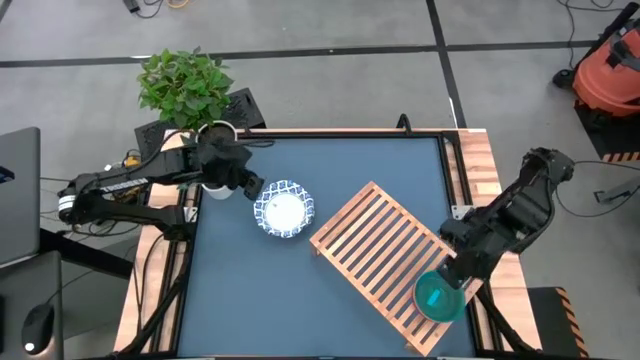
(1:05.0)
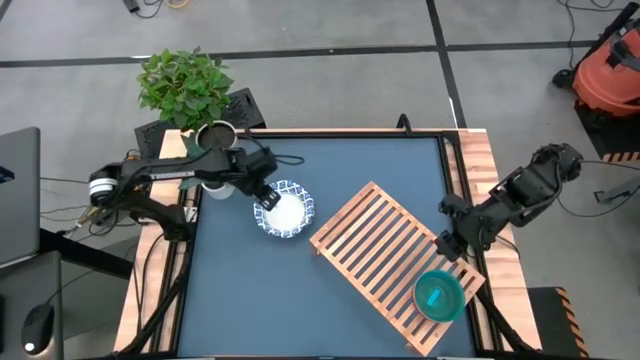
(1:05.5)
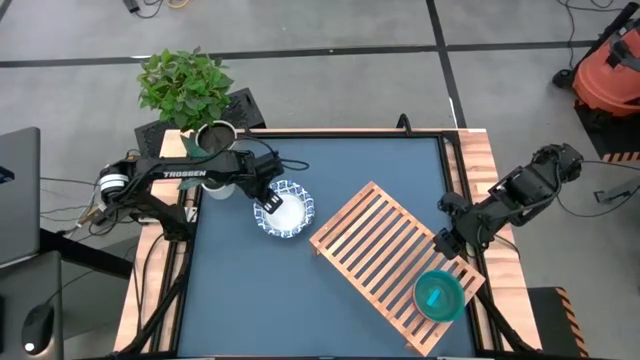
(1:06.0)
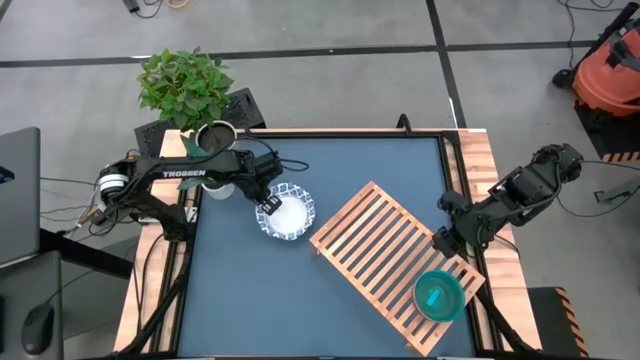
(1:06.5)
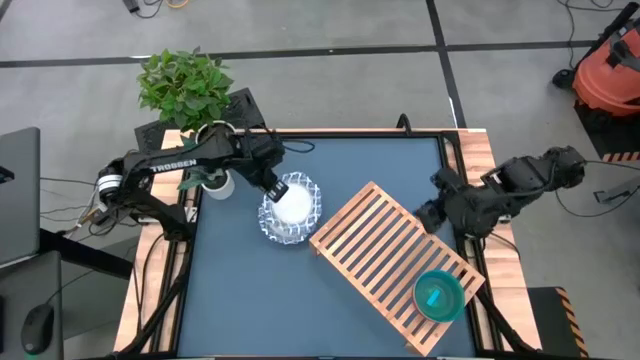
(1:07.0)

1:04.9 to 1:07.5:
Task: Place and stack bowls onto a shelf
Put the white bowl on the shelf

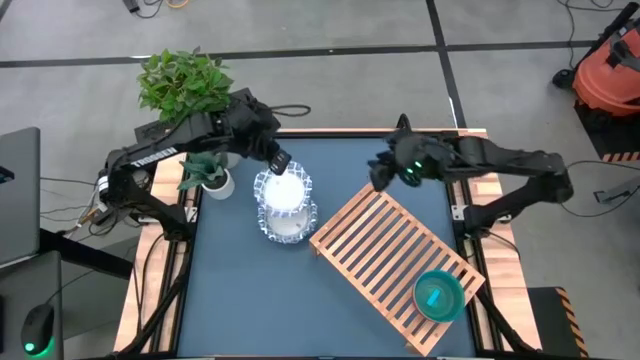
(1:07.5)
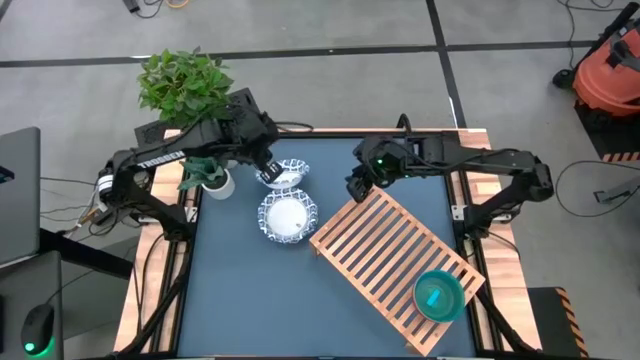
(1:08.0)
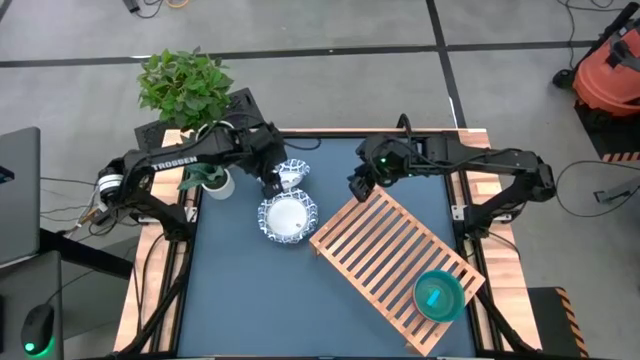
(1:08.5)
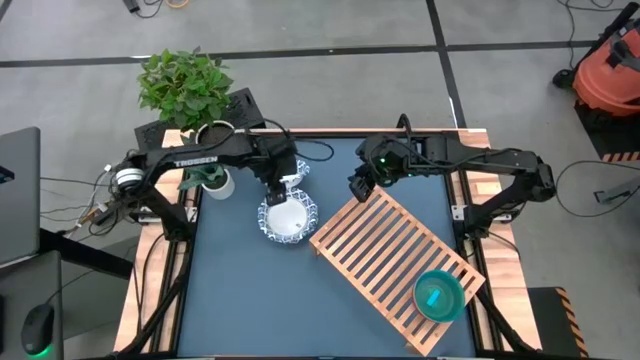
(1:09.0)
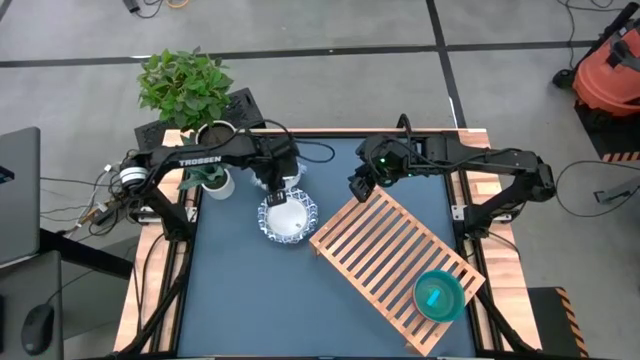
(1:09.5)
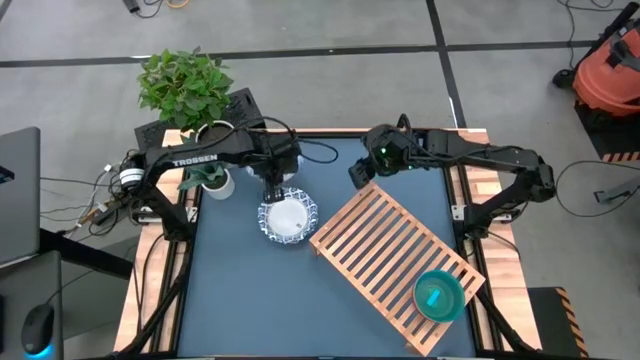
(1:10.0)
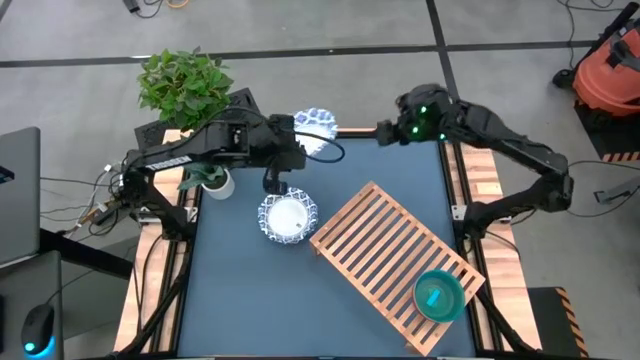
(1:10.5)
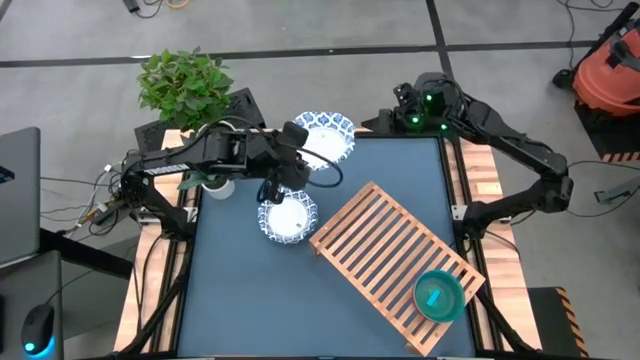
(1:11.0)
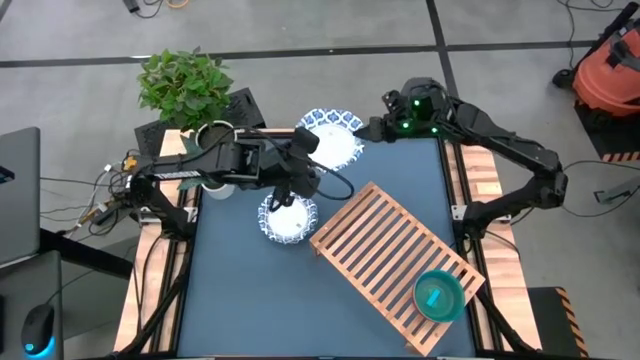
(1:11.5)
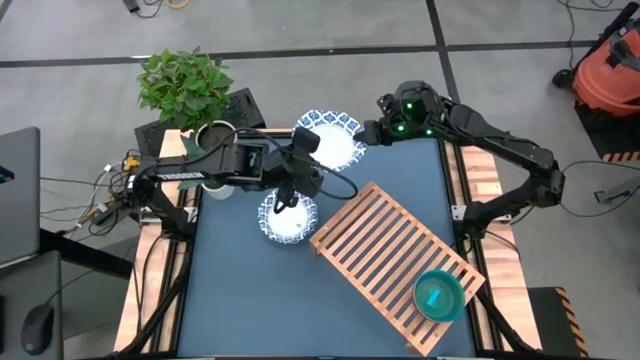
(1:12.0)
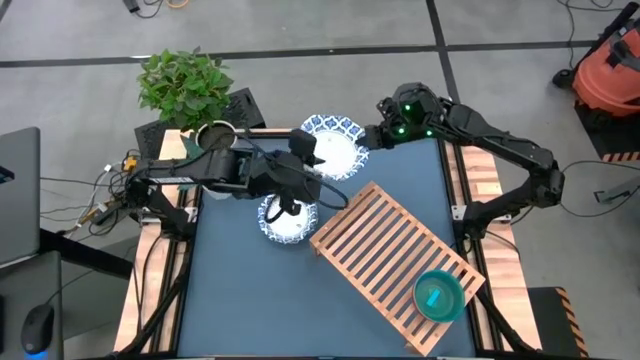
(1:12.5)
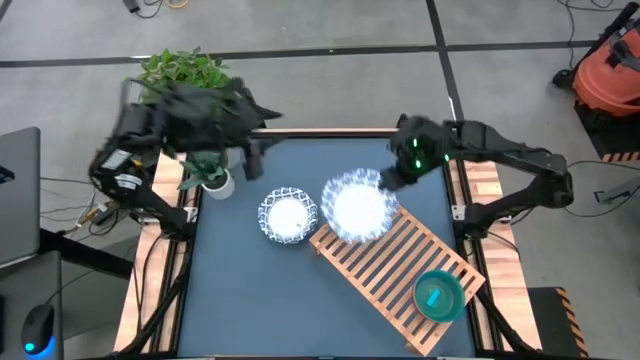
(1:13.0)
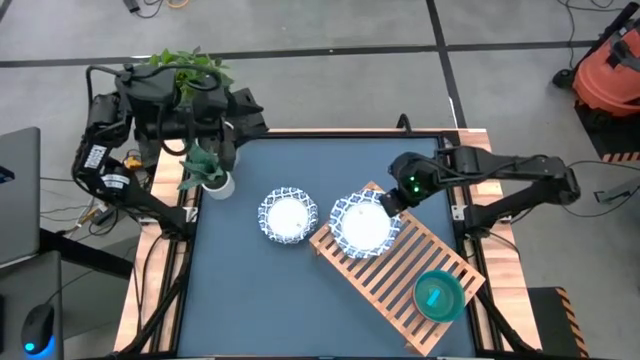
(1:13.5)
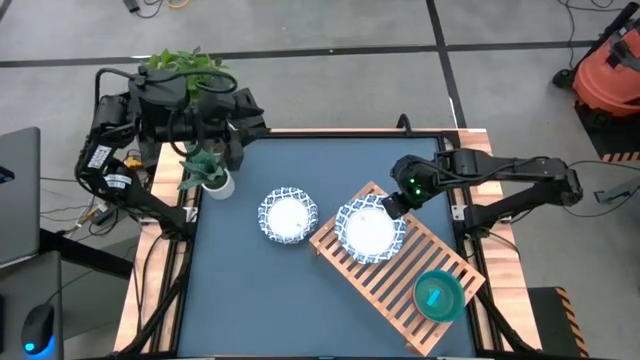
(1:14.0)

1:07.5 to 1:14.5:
Put the white bowl on the shelf

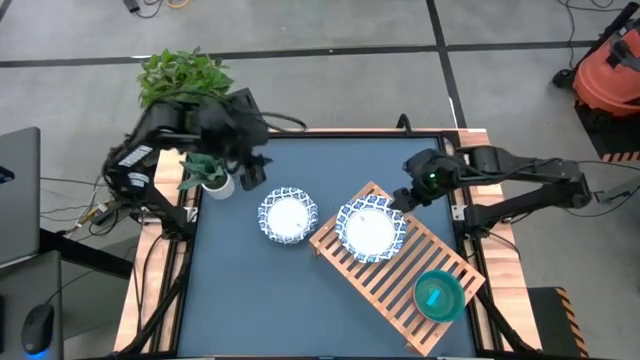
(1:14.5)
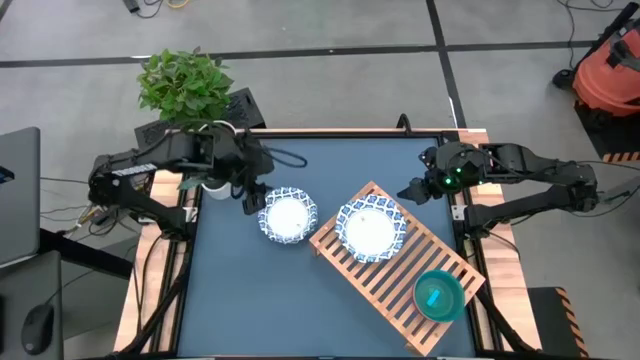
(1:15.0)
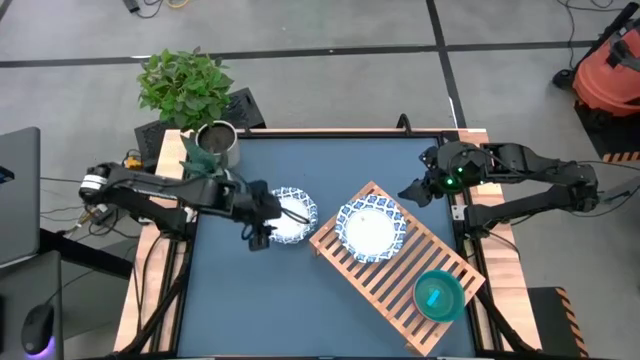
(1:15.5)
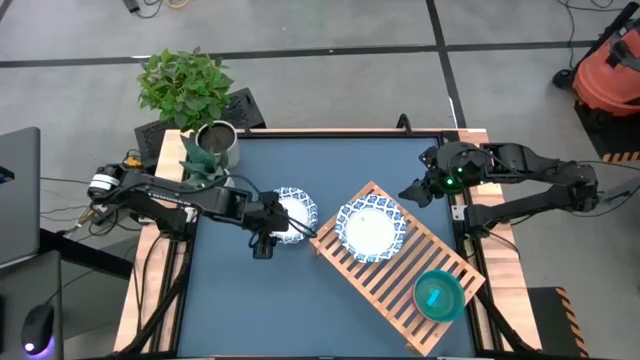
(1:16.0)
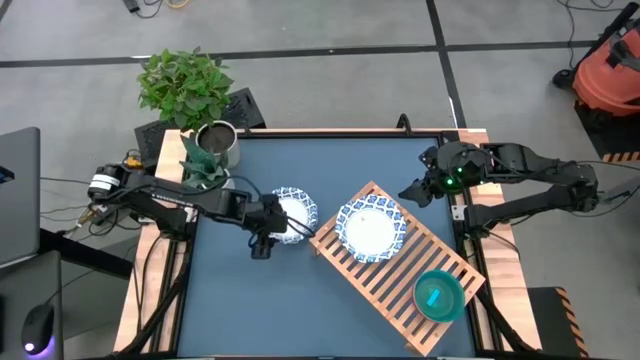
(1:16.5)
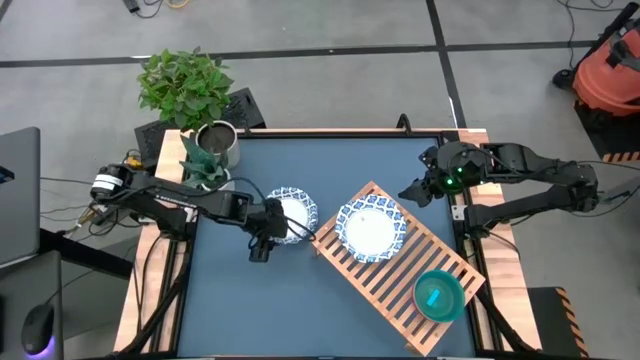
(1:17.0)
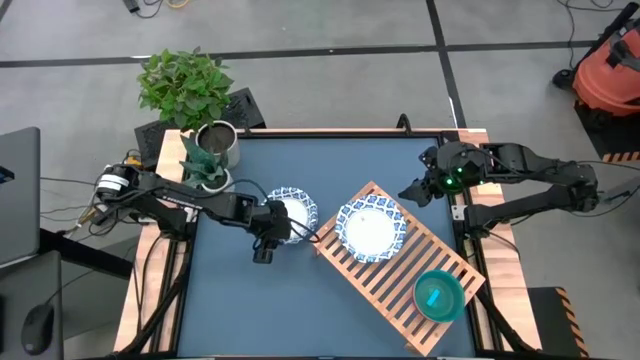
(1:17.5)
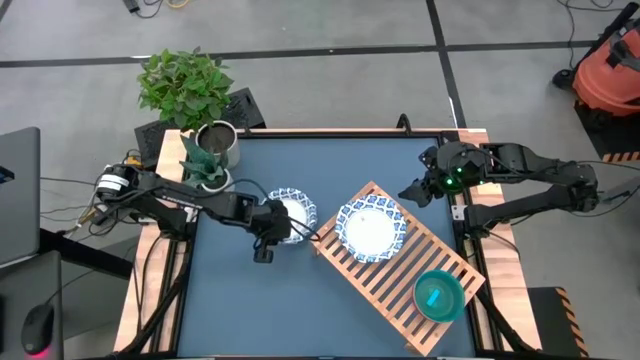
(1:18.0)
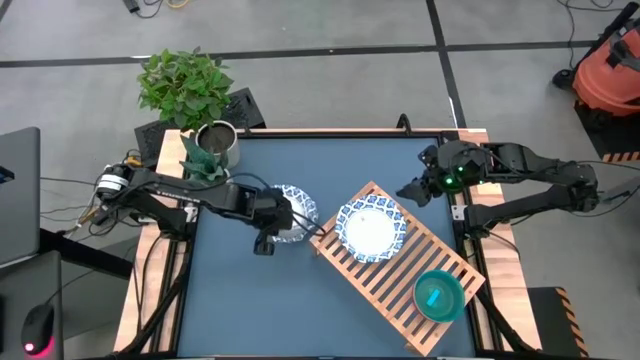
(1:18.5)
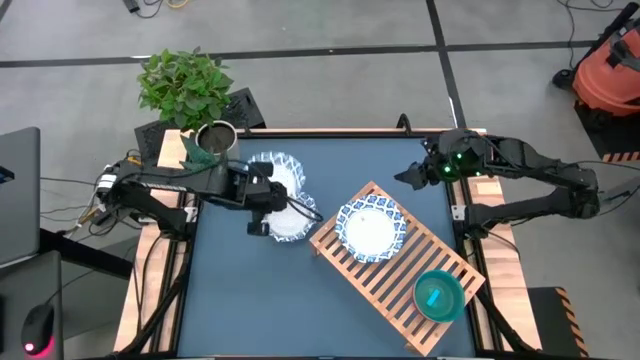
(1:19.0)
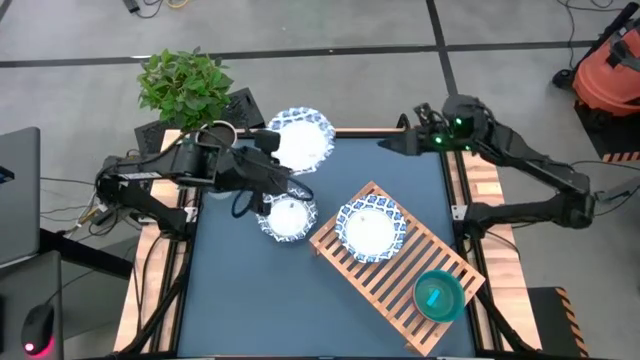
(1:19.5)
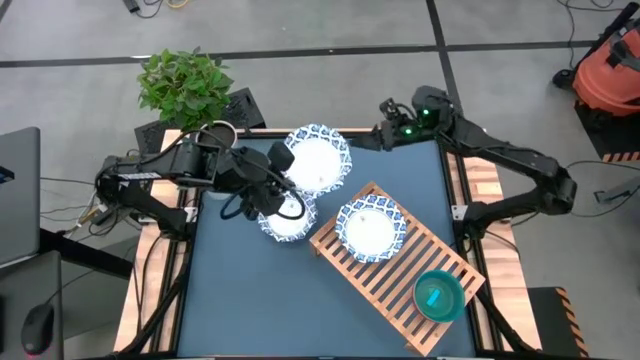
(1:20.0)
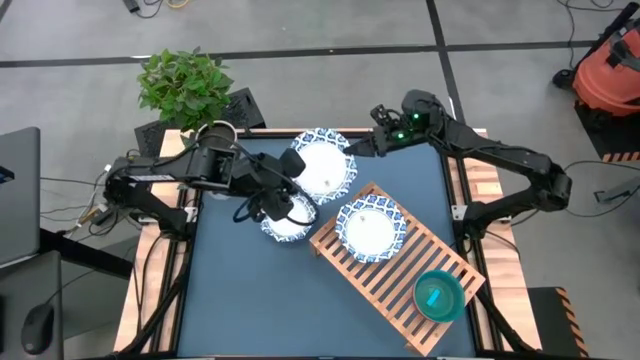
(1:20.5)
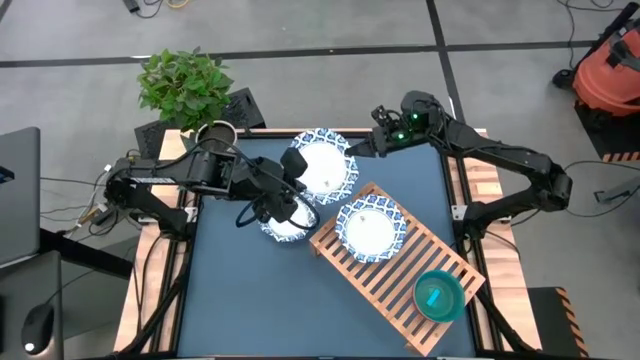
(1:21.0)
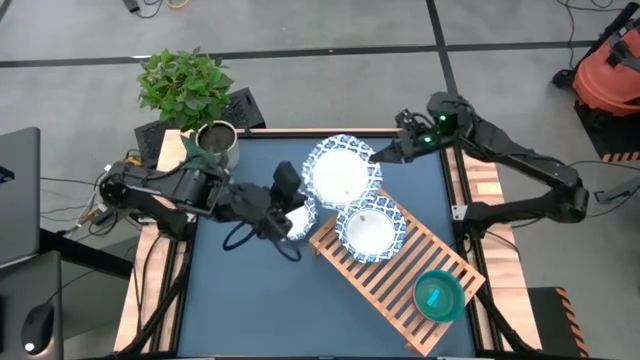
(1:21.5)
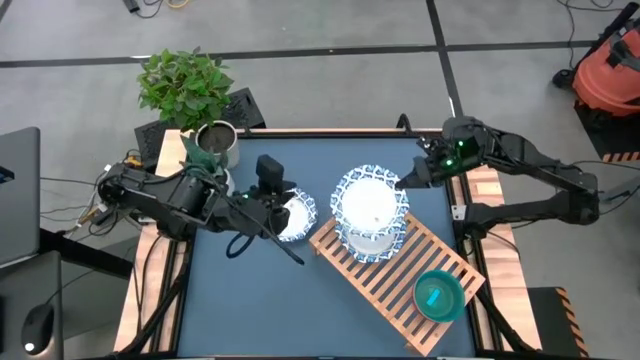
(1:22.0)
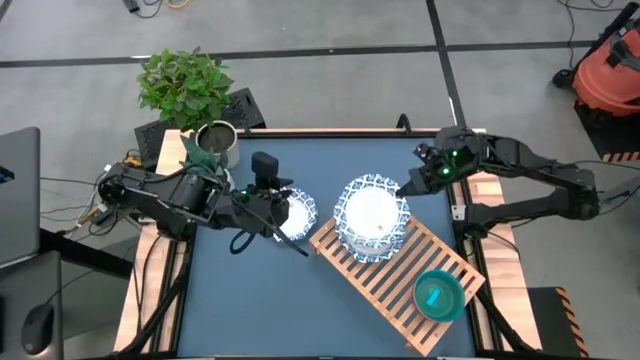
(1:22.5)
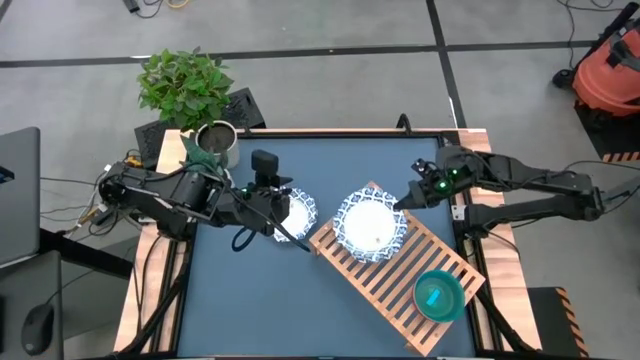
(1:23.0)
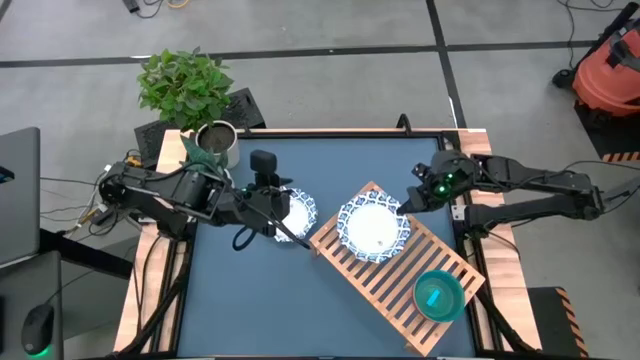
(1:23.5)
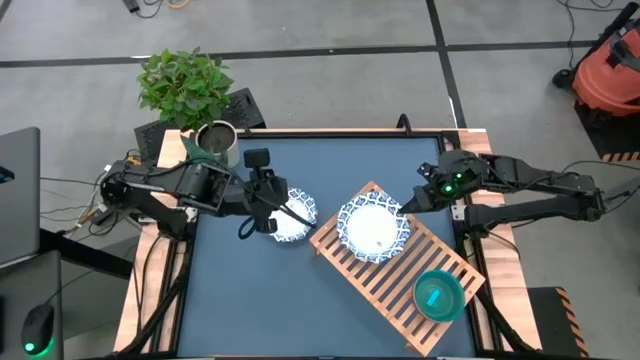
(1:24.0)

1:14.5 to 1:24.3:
Stack the large white bowl on top of the large white bowl on the shelf

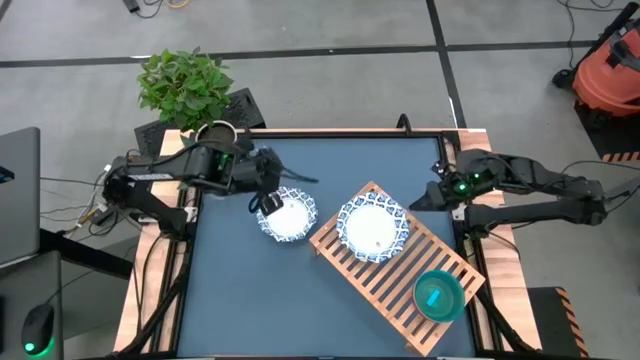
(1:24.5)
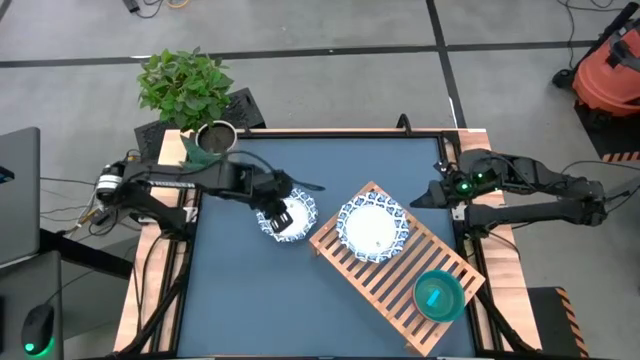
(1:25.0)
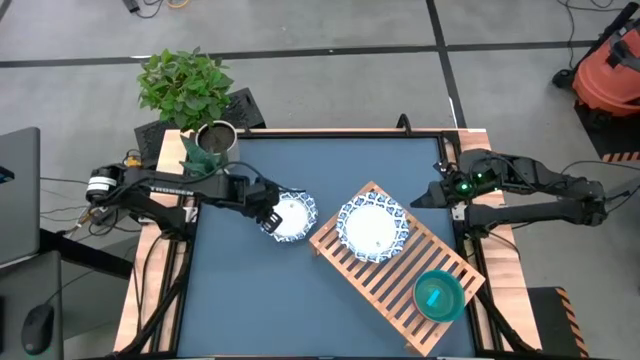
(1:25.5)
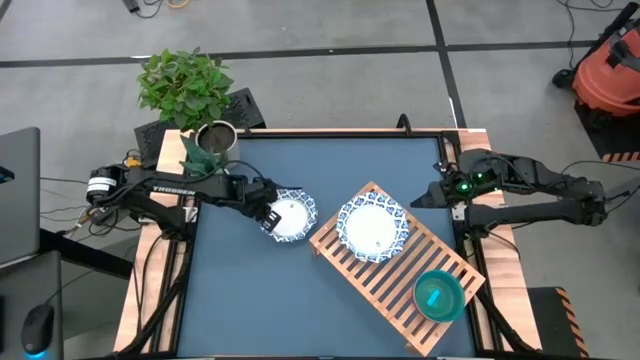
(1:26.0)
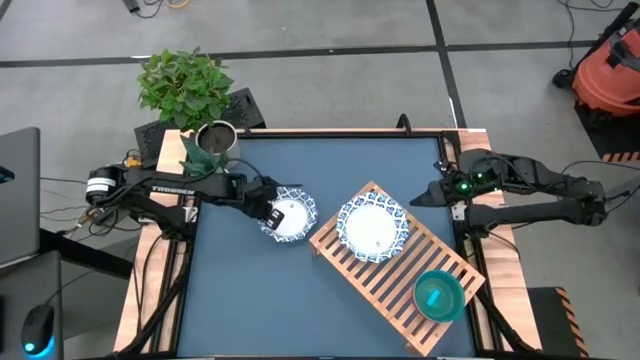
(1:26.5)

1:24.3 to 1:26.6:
Stack the large white bowl on top of the large white bowl on the shelf
